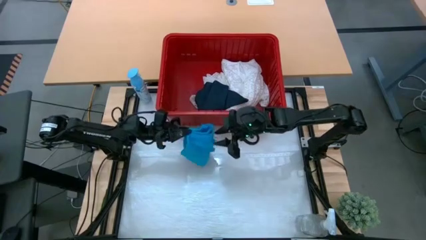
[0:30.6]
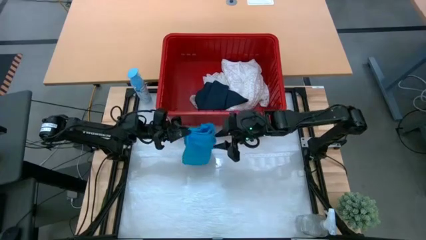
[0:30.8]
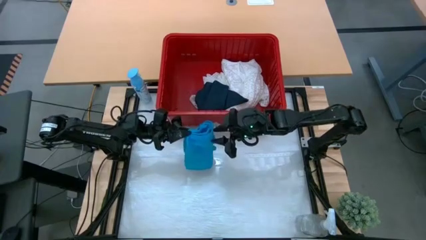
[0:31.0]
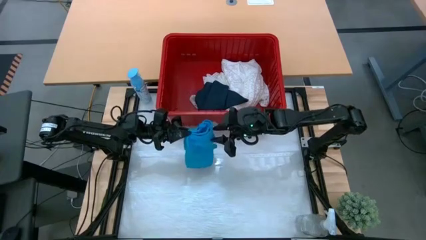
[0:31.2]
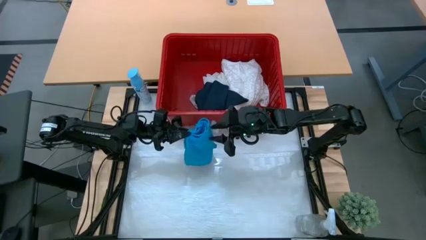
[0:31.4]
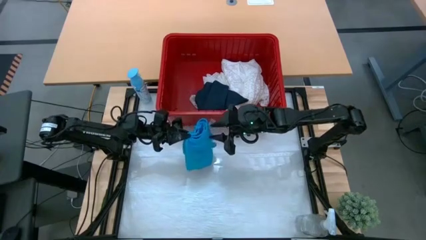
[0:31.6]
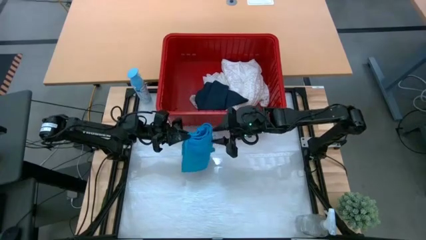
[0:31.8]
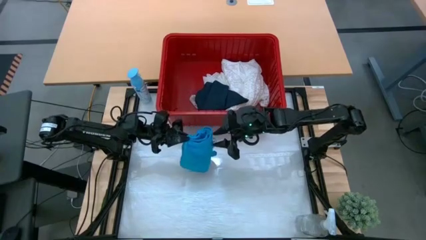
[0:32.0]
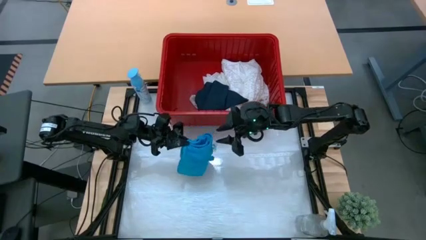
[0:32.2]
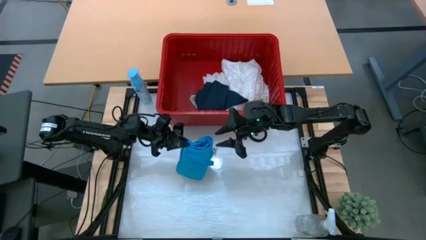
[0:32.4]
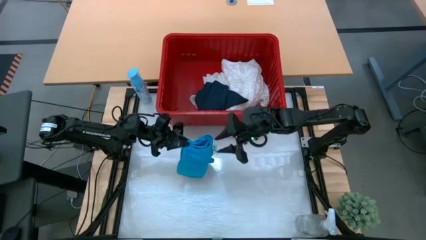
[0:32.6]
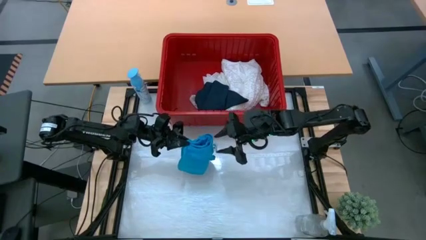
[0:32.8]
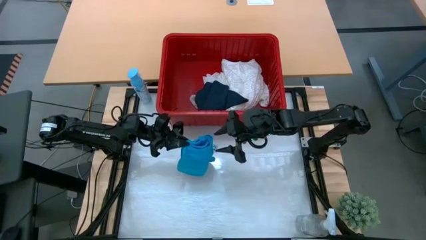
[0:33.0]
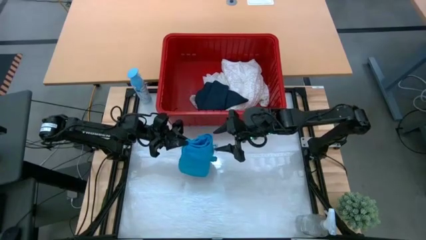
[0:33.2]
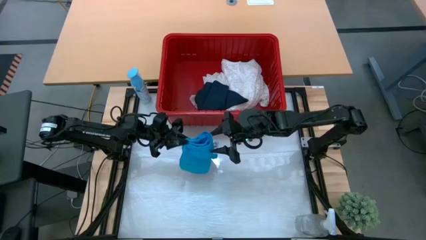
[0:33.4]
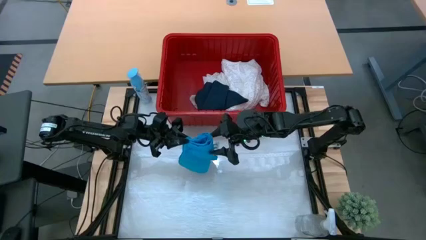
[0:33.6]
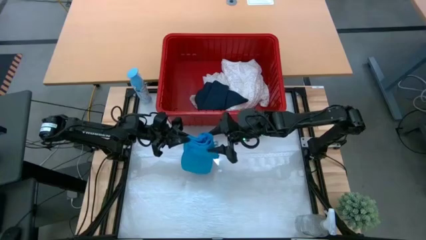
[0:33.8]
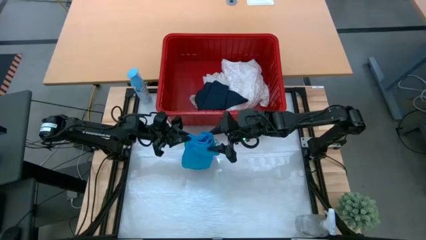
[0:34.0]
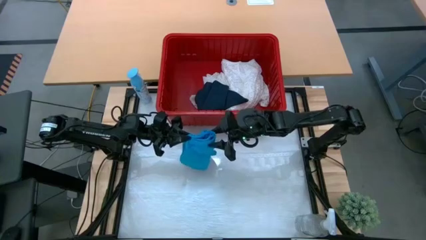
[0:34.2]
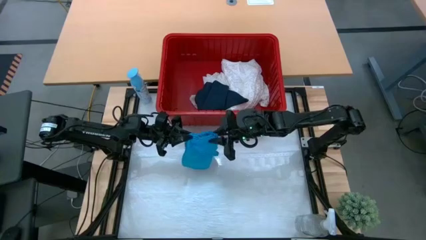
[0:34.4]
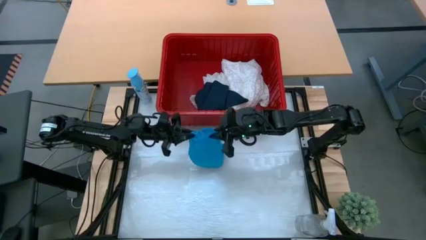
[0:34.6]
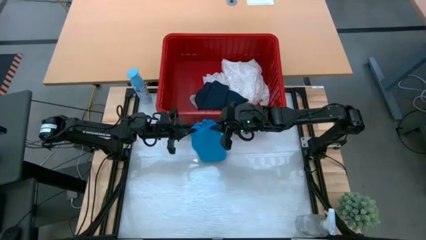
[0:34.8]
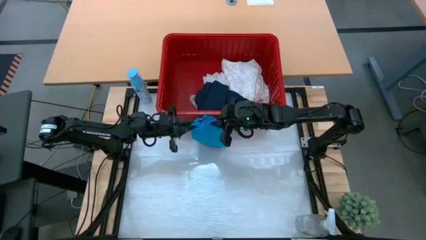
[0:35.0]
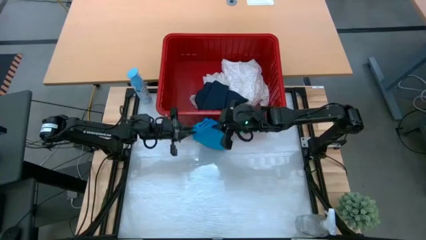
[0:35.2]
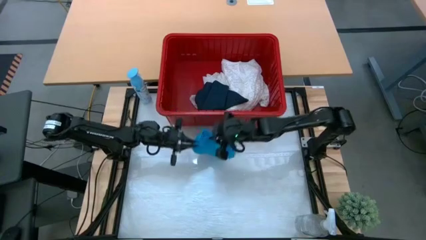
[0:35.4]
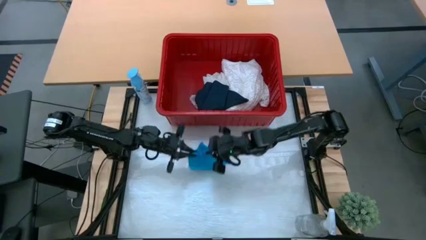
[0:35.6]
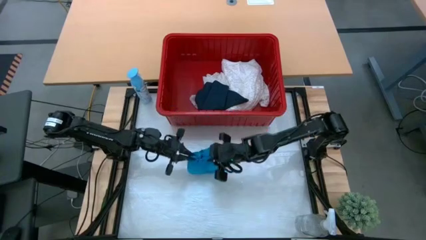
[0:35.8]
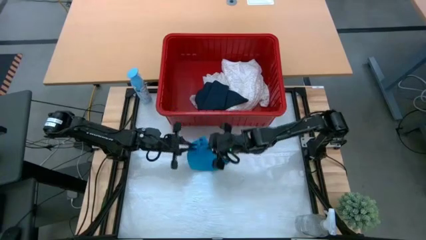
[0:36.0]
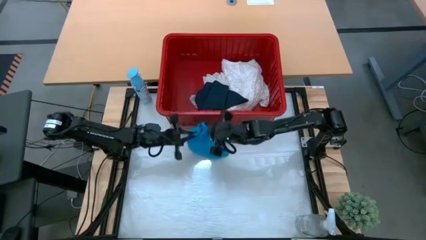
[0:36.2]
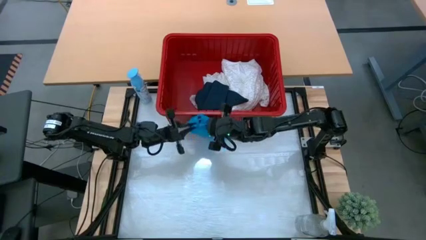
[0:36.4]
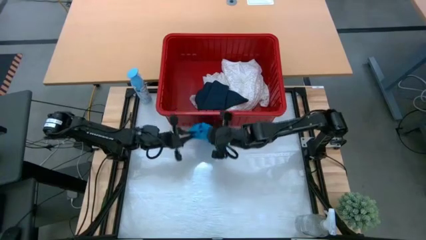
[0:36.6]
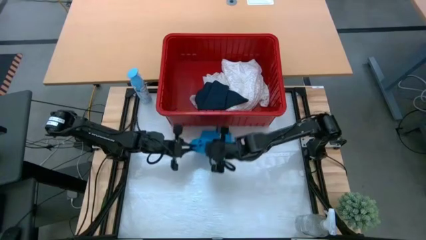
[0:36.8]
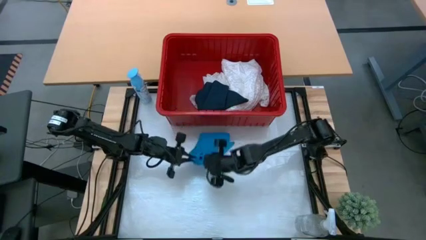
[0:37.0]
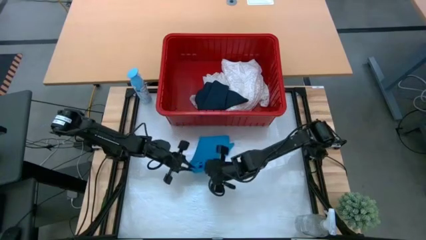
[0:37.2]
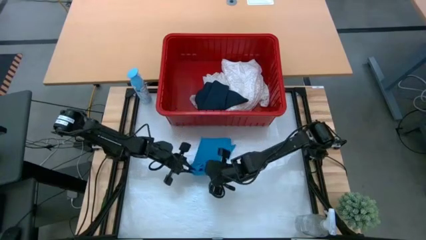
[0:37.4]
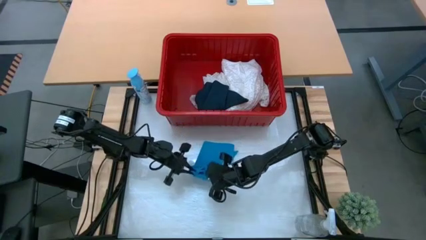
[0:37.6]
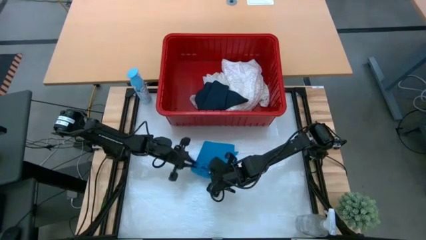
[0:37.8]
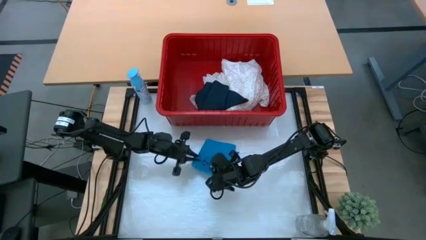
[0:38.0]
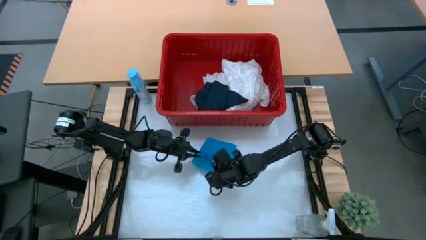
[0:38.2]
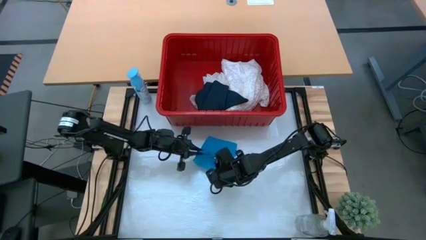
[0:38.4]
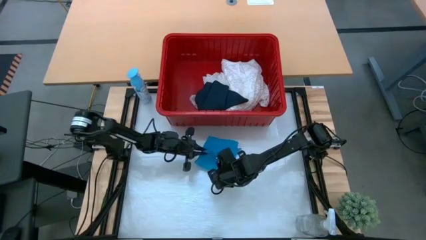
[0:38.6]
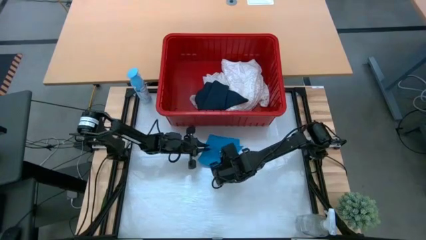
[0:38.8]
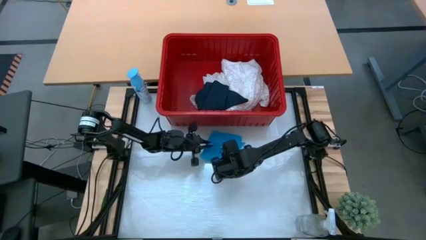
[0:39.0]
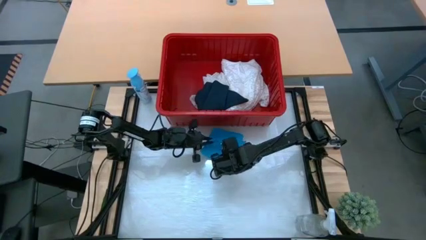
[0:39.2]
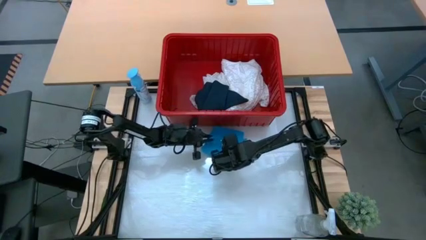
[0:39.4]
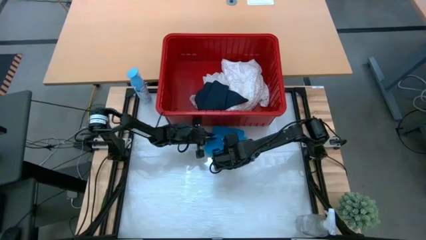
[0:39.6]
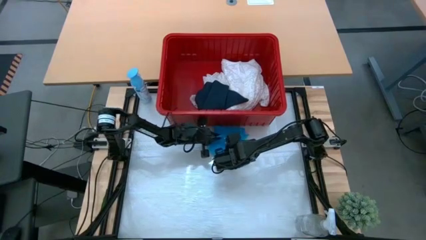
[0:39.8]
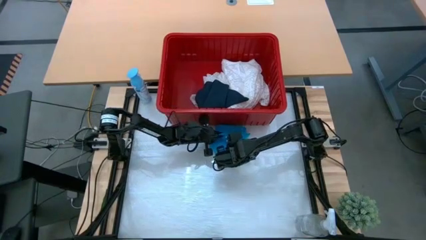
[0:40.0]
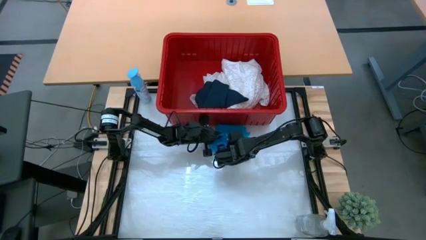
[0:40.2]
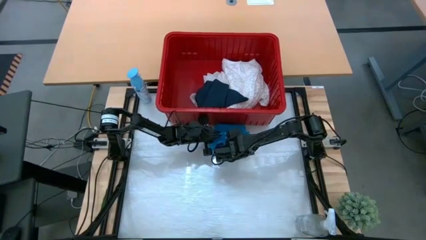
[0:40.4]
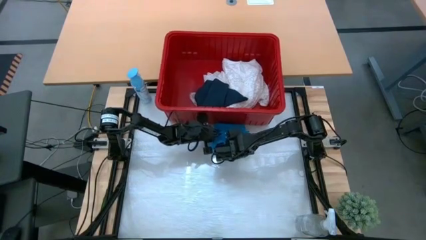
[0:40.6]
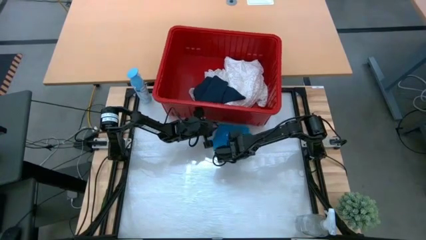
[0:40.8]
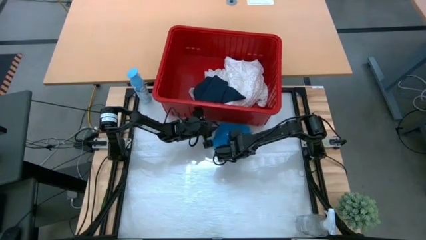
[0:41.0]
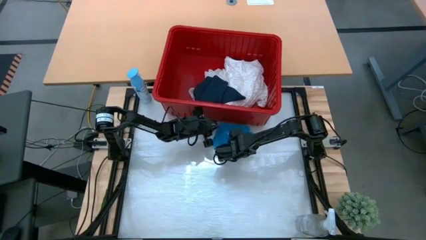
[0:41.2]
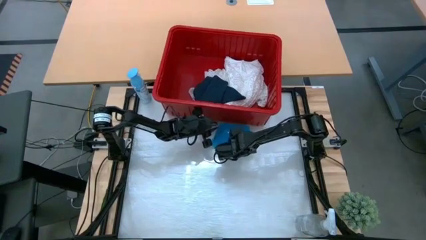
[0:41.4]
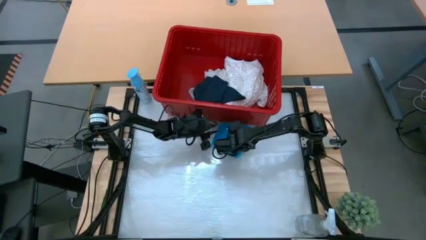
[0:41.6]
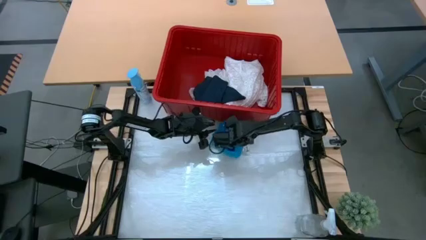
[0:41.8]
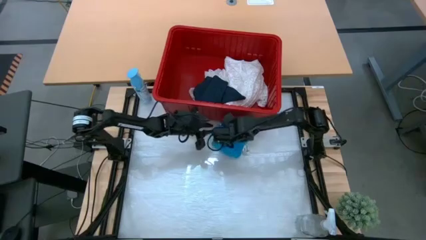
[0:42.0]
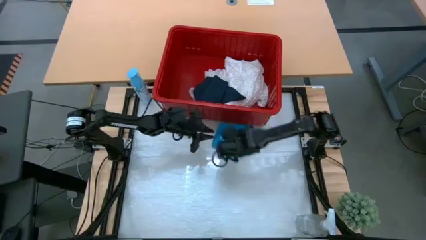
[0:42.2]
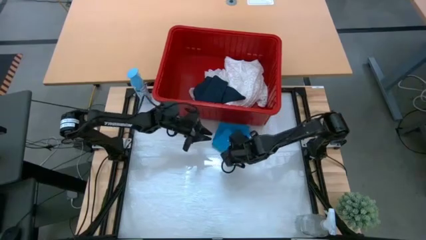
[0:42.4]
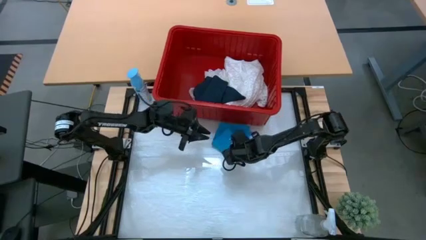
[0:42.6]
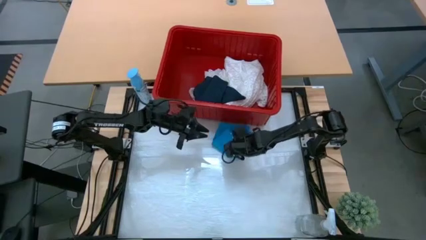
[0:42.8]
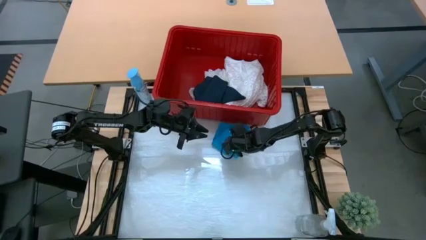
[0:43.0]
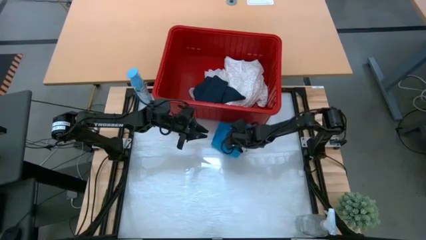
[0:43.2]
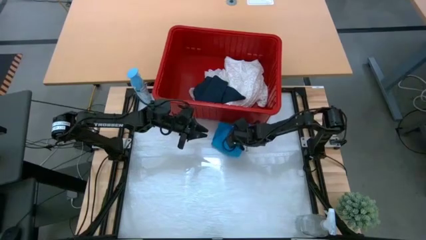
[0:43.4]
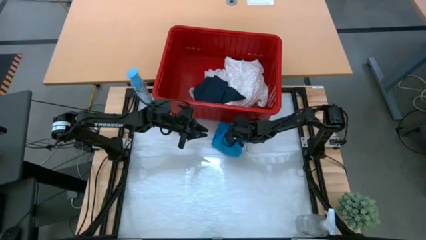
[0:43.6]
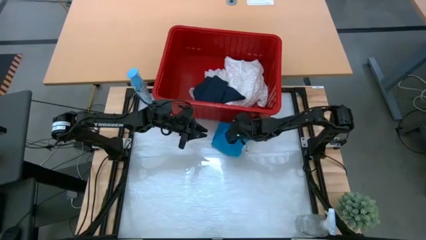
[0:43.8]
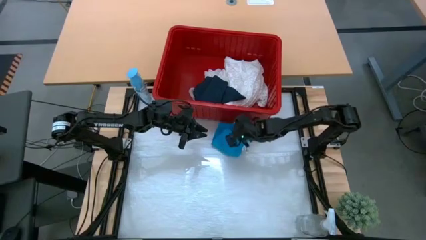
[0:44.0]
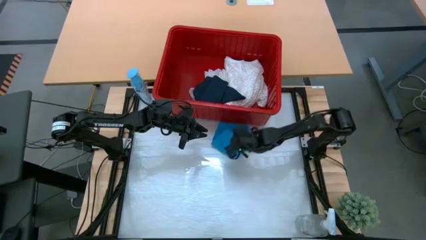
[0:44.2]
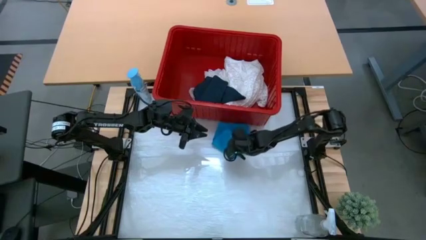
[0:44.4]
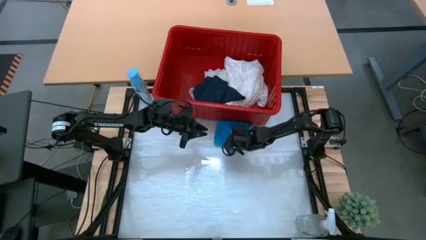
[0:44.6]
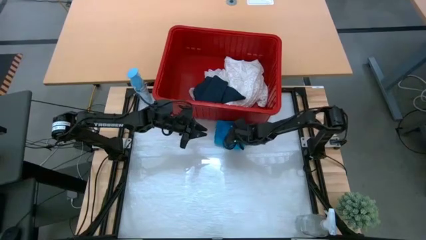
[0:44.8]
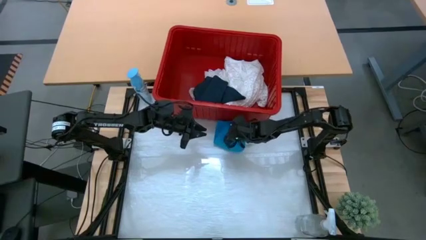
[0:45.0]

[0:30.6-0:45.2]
Task: Fold laundry
Fold the blue shorts
